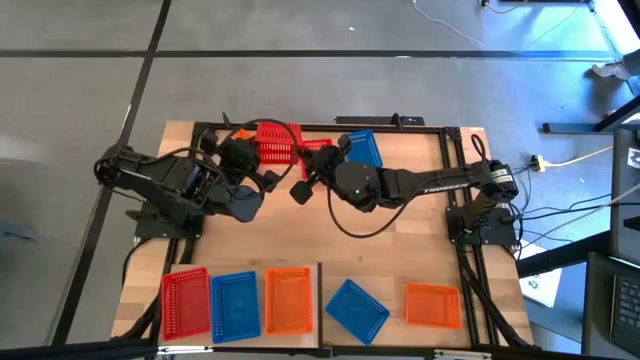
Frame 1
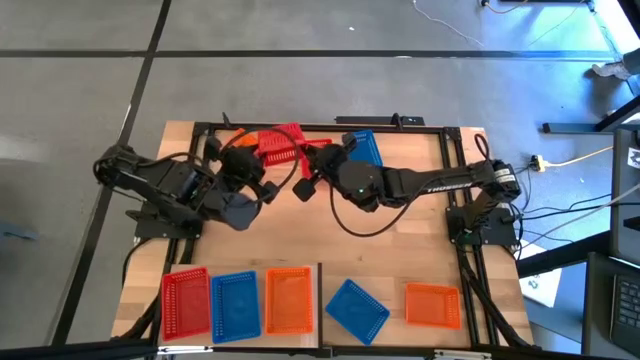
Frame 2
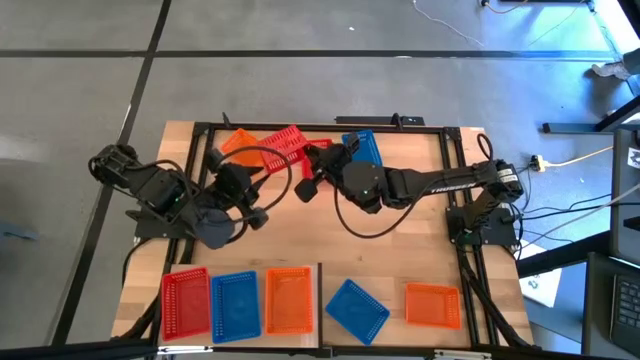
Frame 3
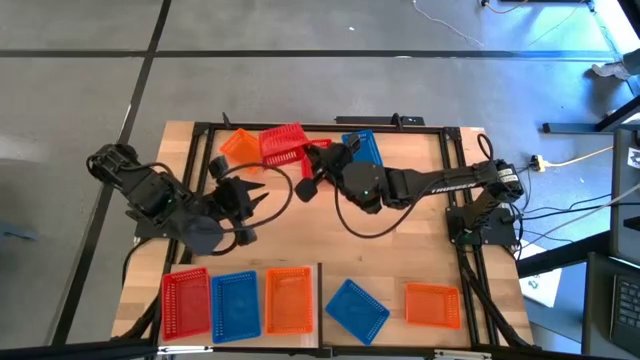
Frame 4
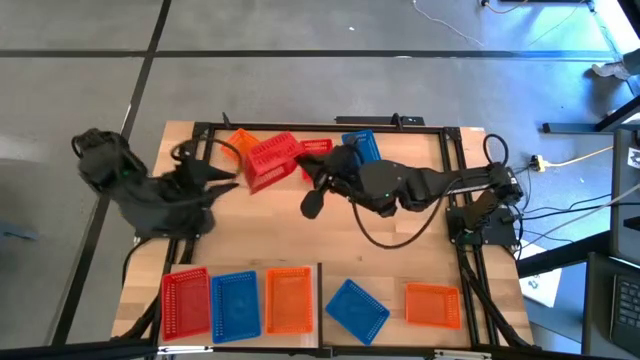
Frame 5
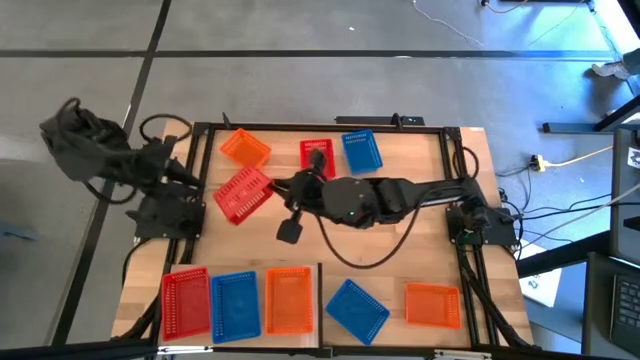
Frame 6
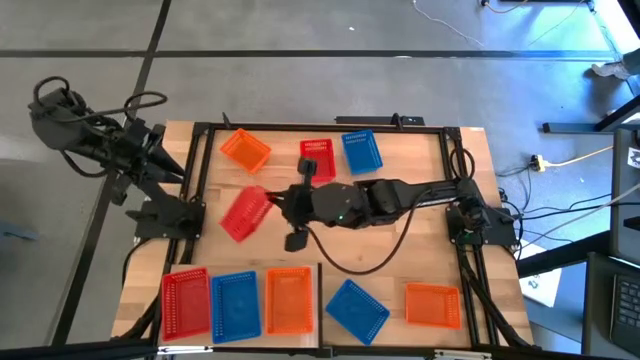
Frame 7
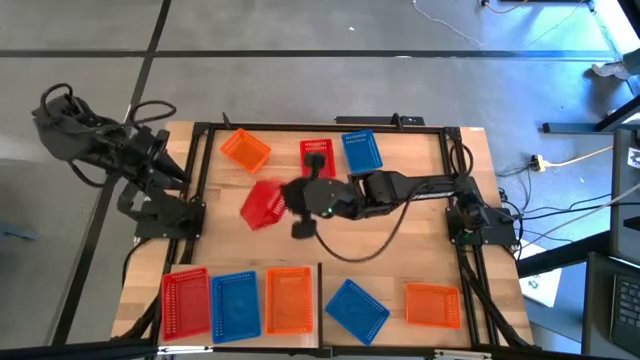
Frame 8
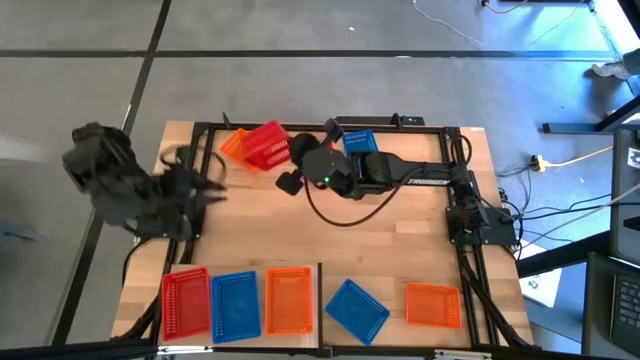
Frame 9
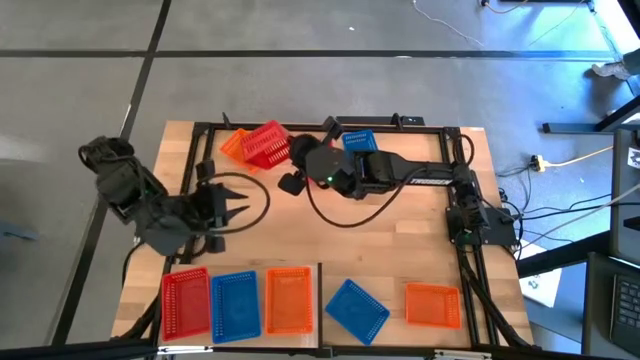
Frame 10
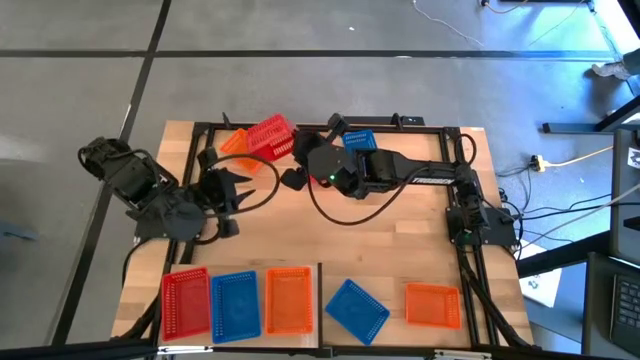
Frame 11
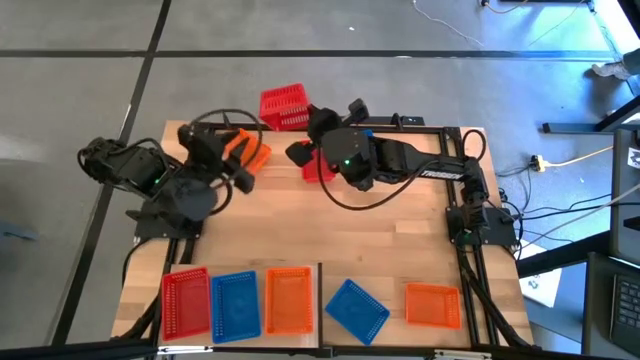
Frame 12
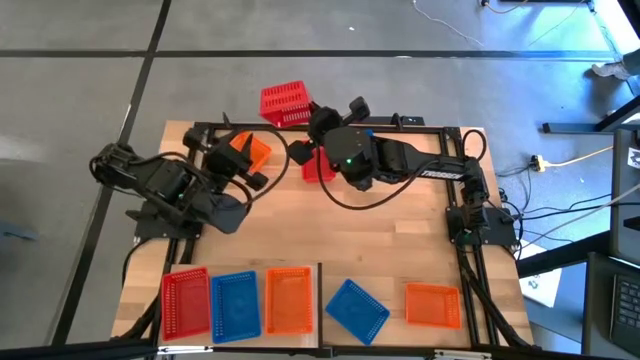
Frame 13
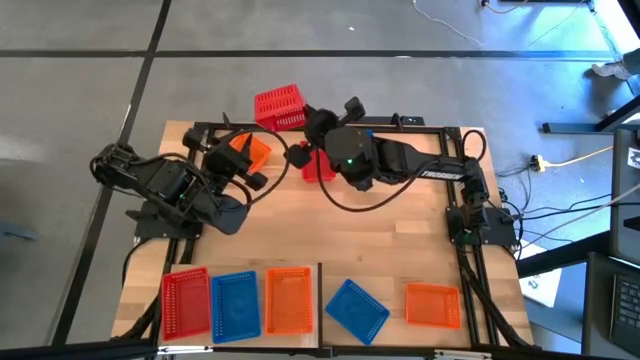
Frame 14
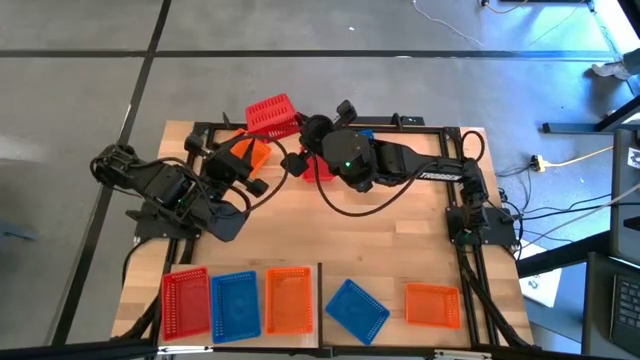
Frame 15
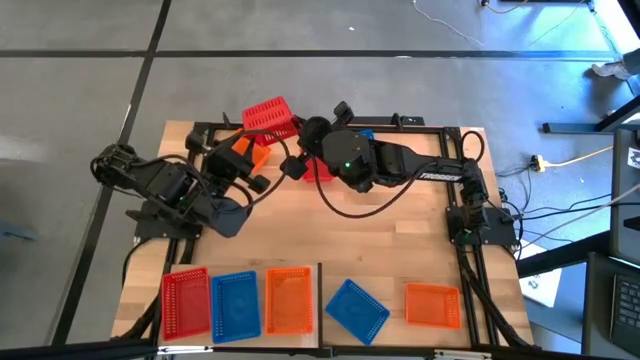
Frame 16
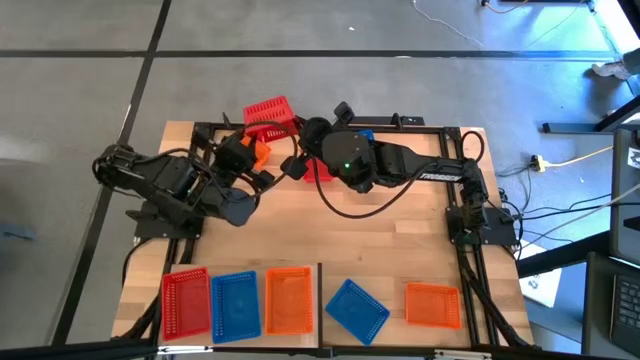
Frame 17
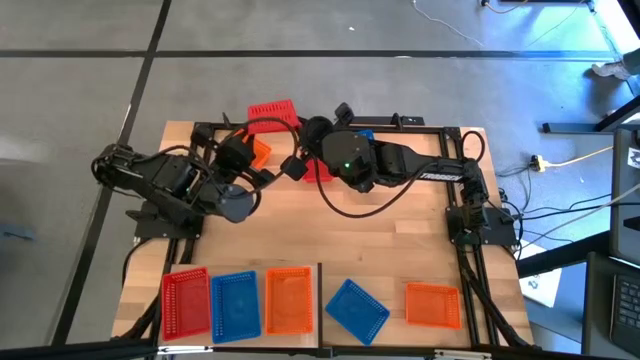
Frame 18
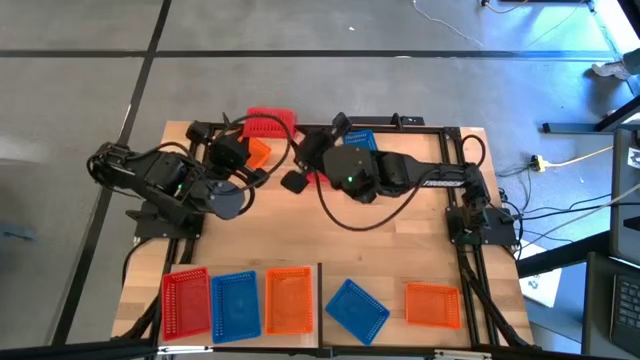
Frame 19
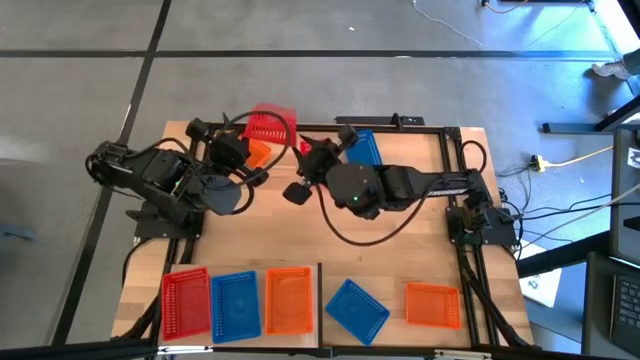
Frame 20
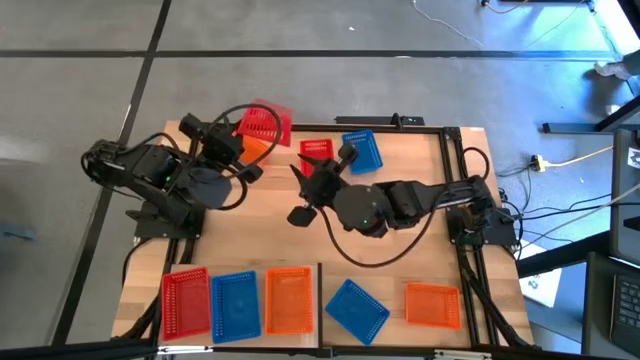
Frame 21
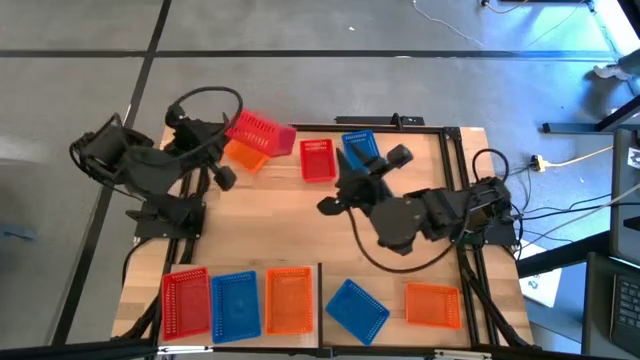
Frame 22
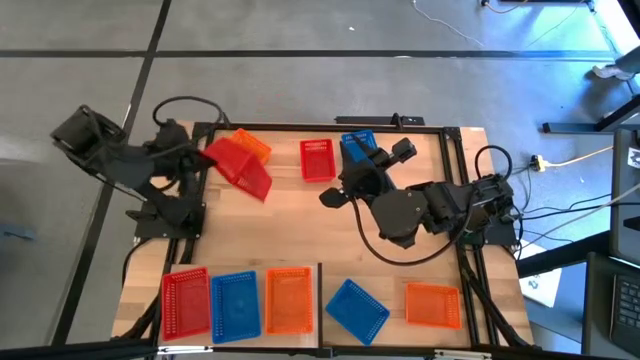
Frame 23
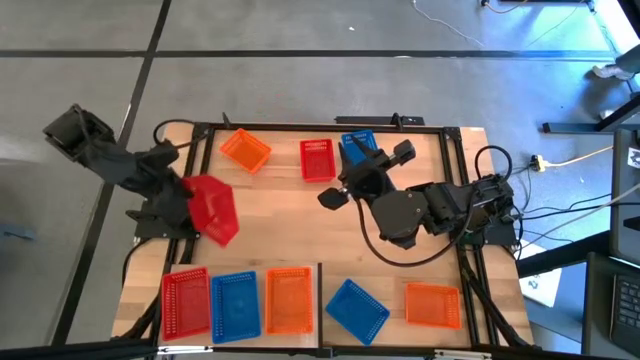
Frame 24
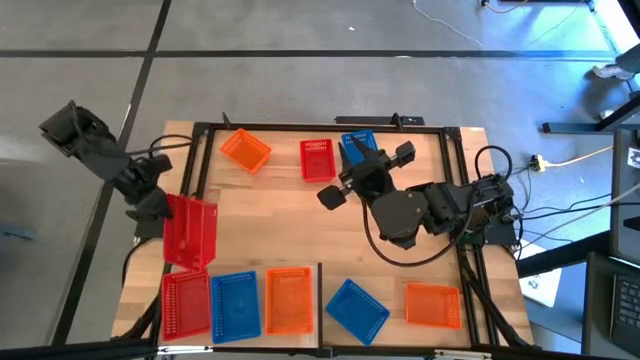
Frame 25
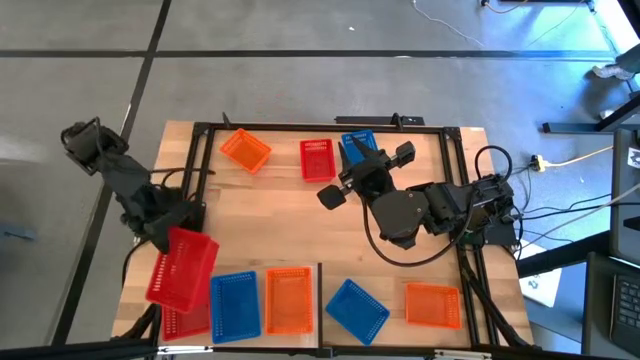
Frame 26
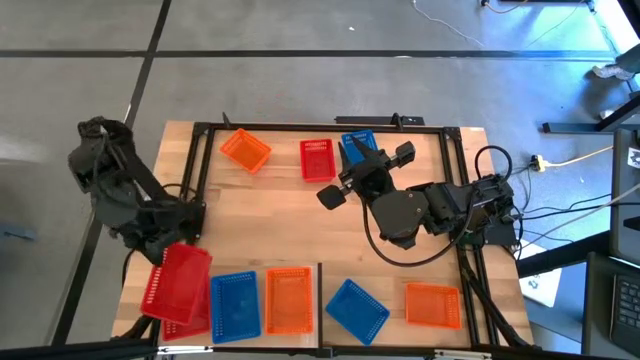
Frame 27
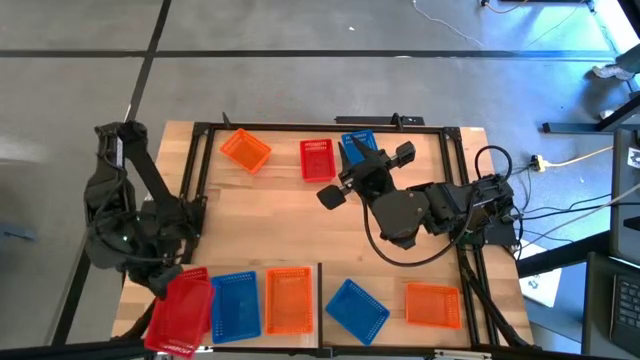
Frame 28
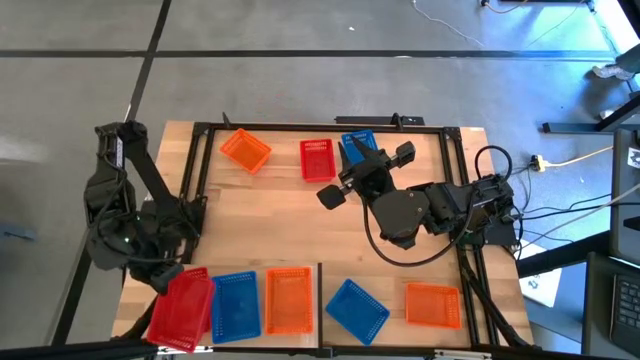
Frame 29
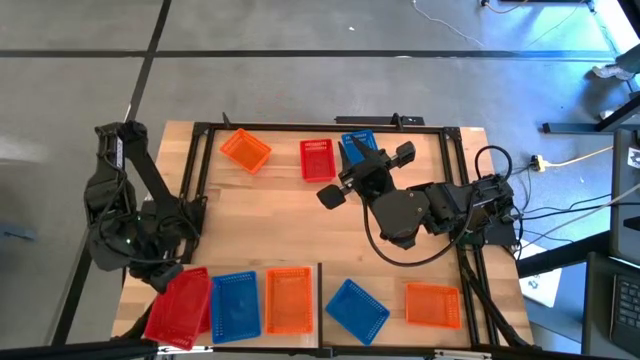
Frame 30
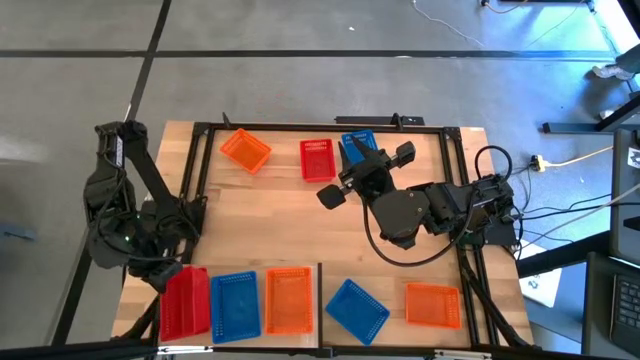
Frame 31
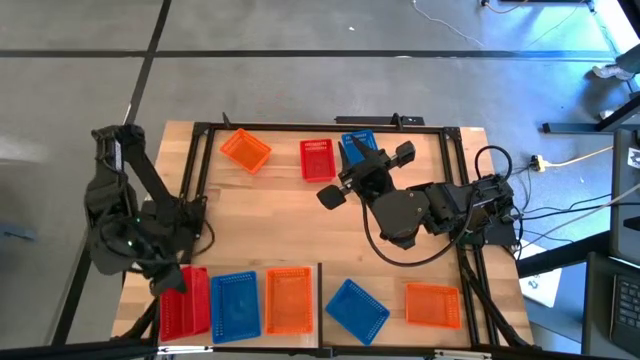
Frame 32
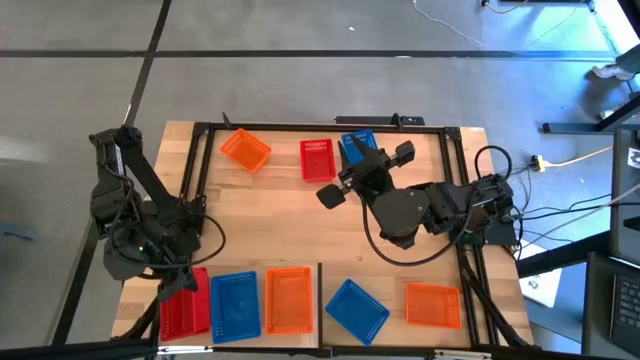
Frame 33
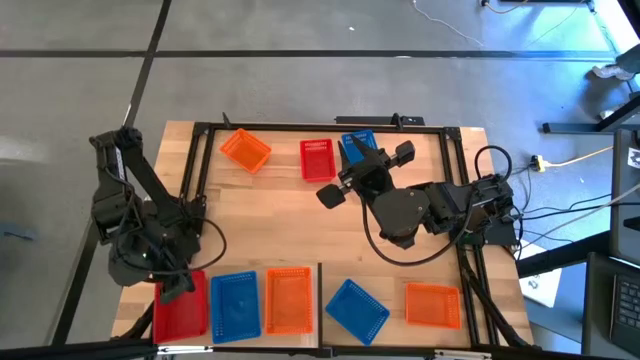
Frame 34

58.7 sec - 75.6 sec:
Task: Stack baskets on shelf by color
Stack the bottom red bin on top of the other red bin on the shelf

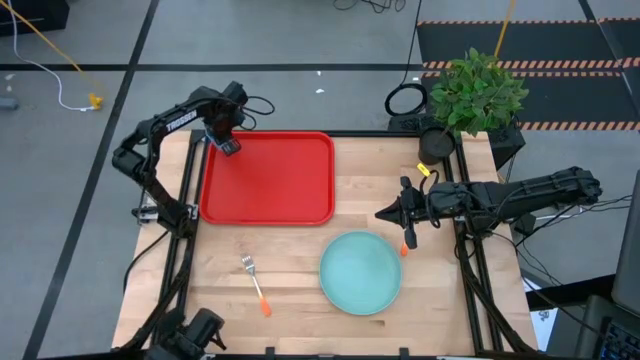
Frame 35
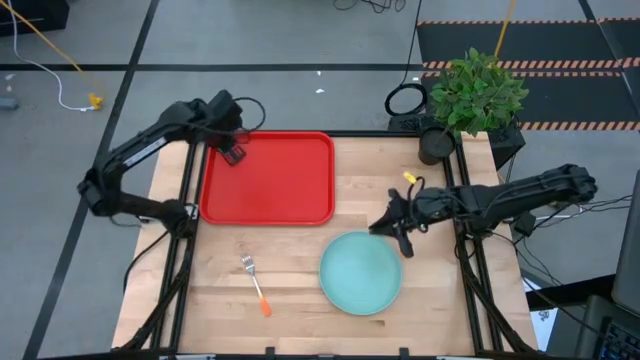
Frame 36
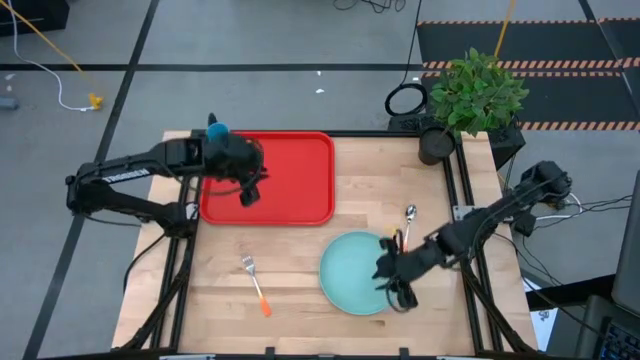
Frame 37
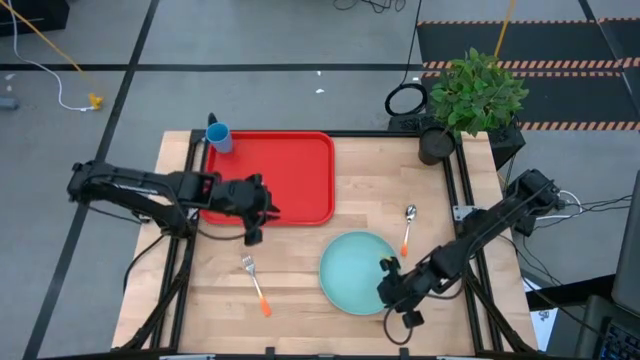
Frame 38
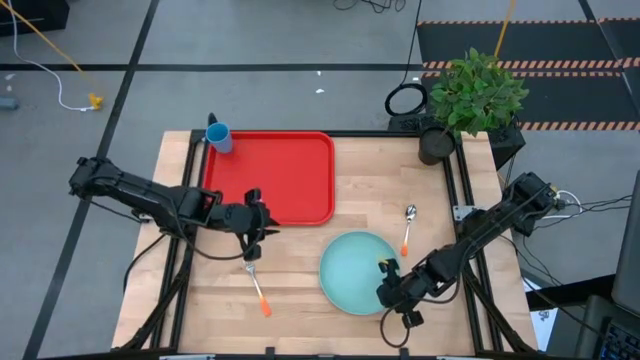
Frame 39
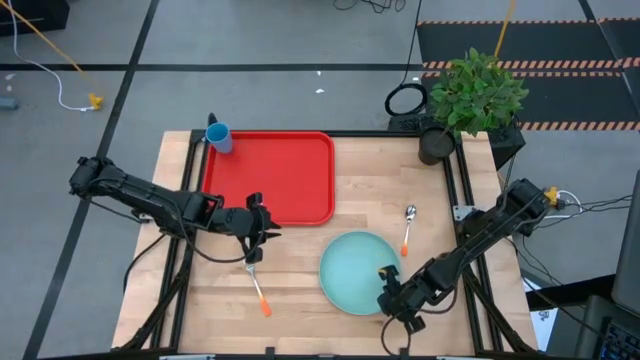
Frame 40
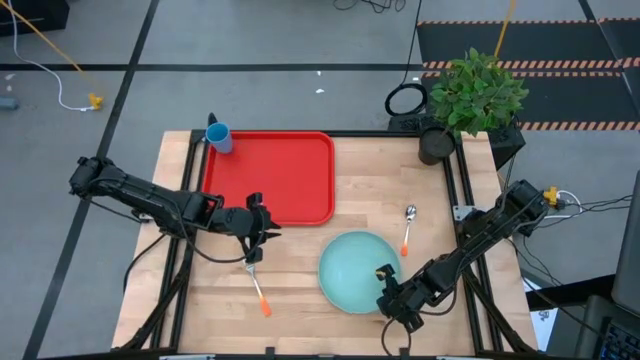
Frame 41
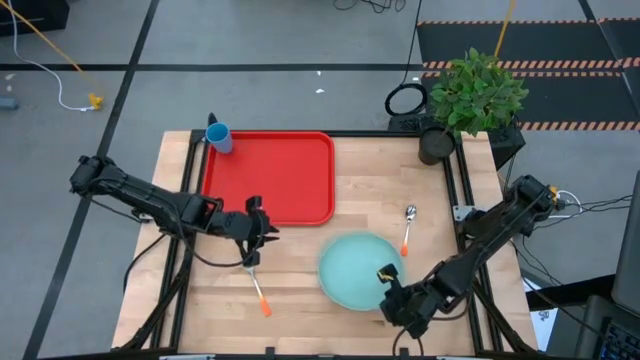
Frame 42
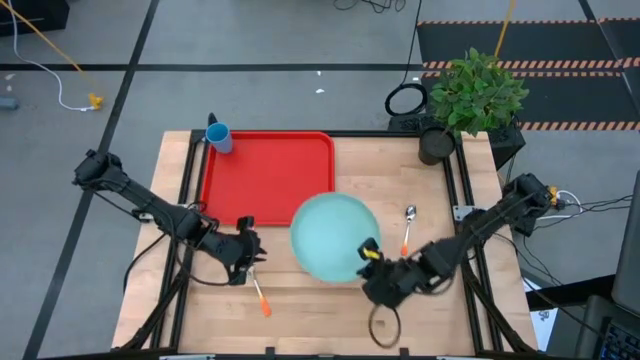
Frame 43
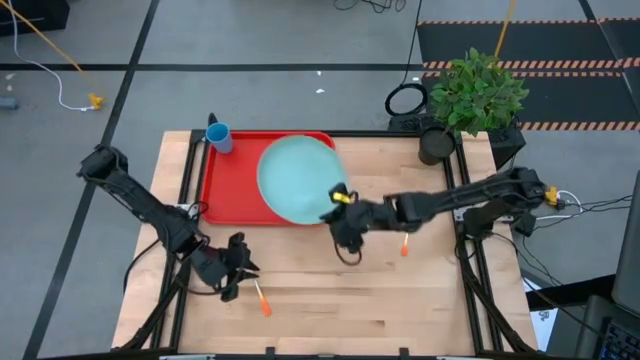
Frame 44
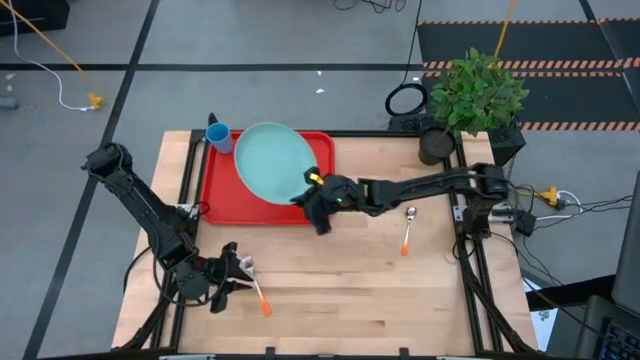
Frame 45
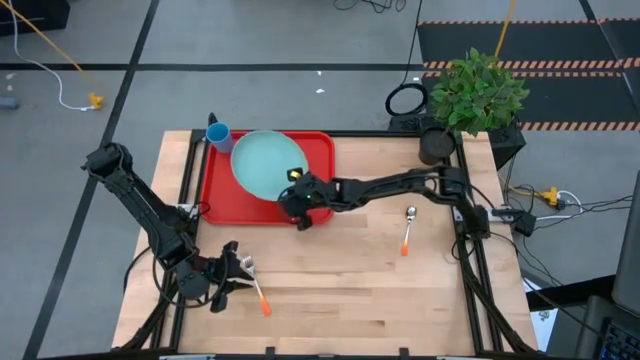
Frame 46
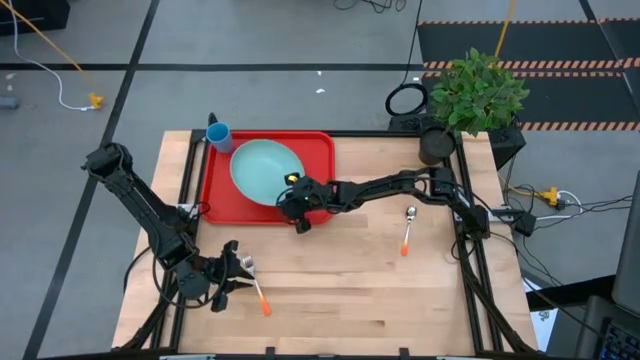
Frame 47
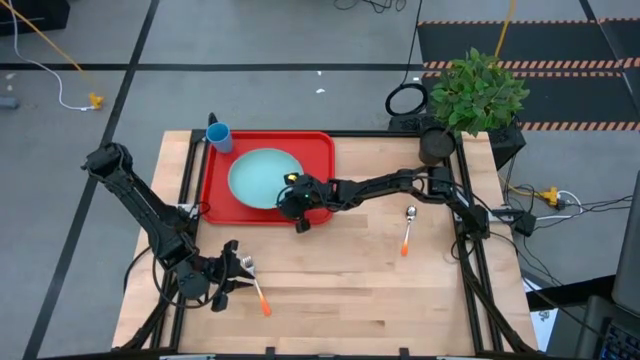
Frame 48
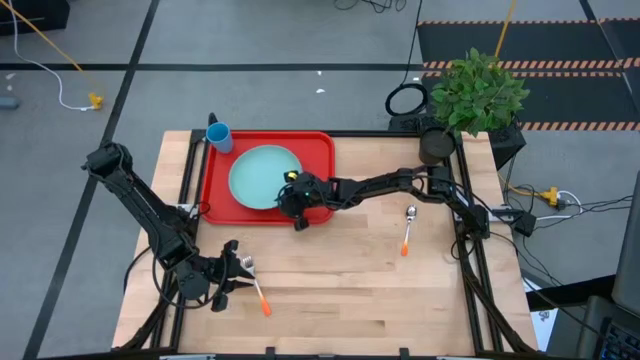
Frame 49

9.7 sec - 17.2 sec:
Task: Pick and place plate/cup/fork/spoon on tray
Put the light green plate on the red serving tray
